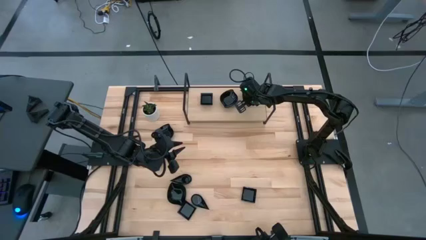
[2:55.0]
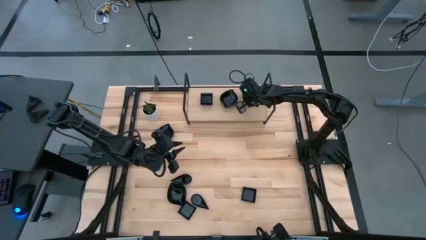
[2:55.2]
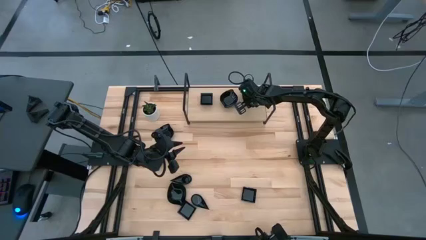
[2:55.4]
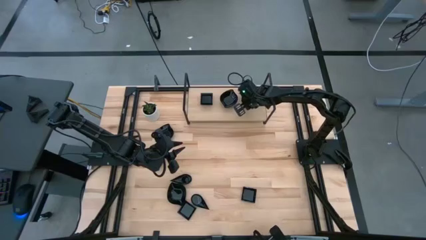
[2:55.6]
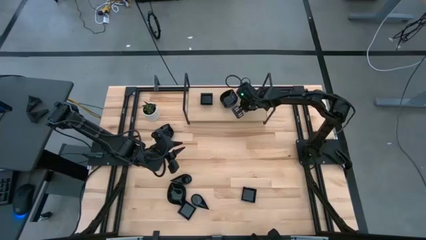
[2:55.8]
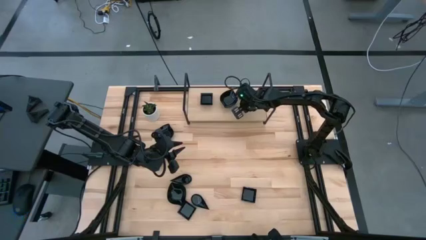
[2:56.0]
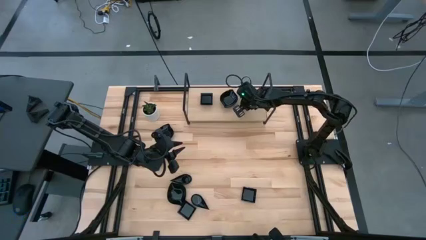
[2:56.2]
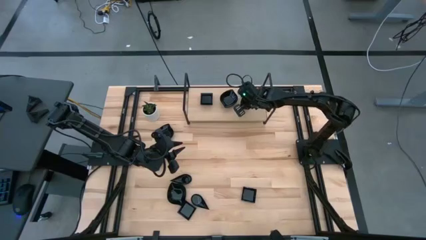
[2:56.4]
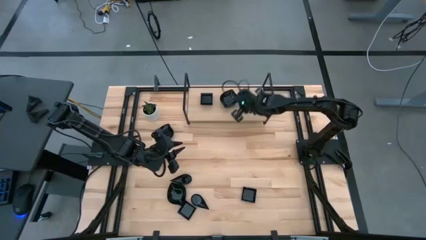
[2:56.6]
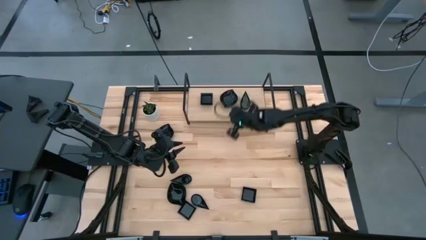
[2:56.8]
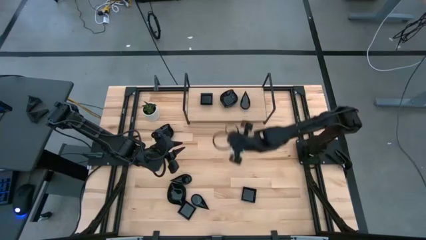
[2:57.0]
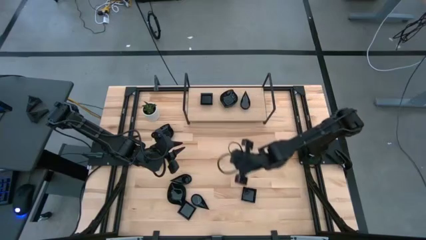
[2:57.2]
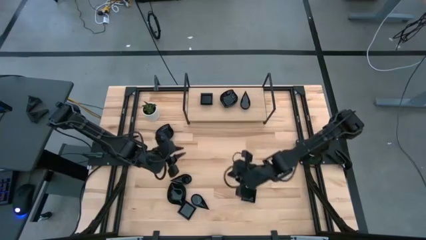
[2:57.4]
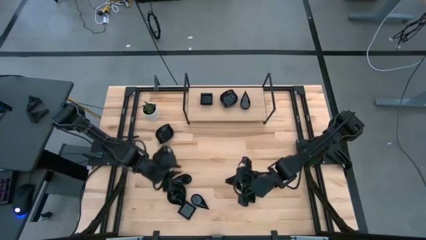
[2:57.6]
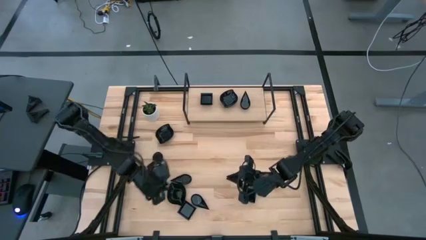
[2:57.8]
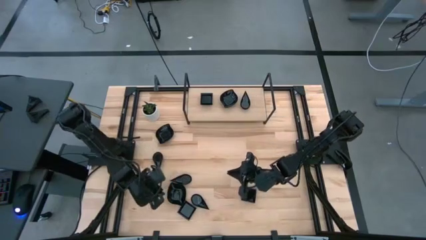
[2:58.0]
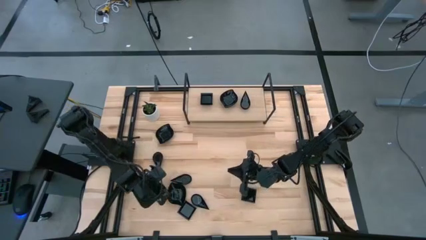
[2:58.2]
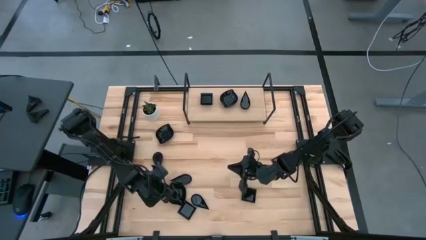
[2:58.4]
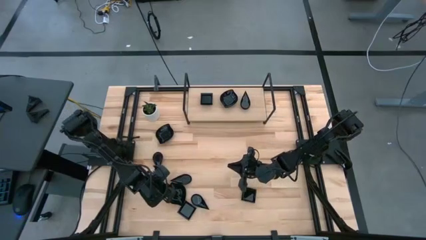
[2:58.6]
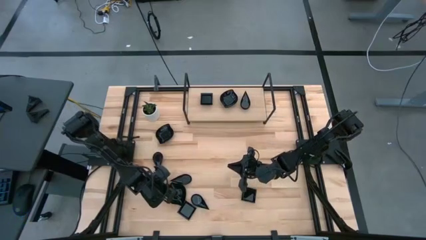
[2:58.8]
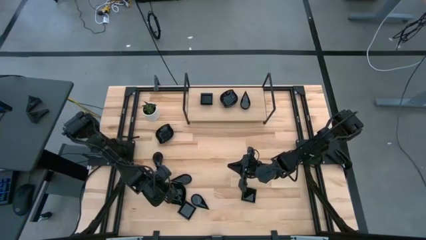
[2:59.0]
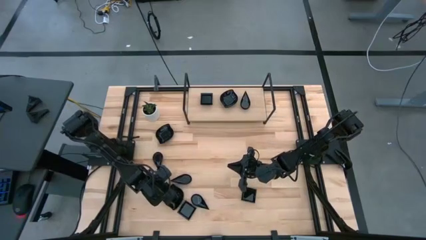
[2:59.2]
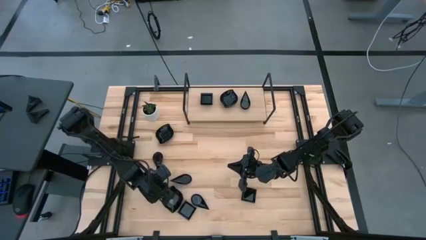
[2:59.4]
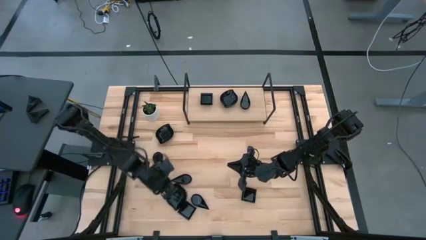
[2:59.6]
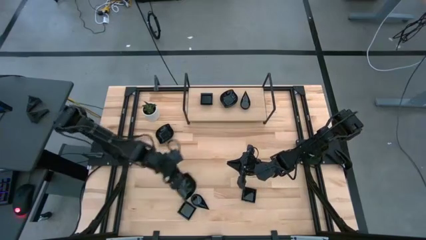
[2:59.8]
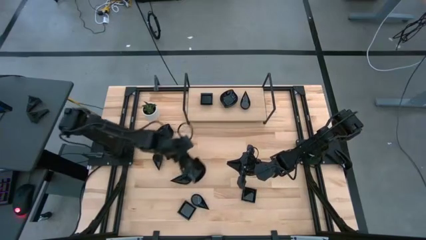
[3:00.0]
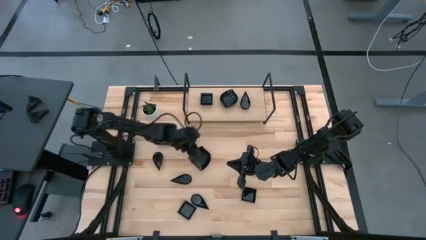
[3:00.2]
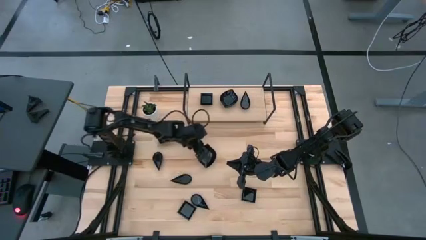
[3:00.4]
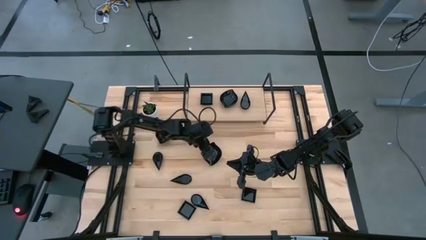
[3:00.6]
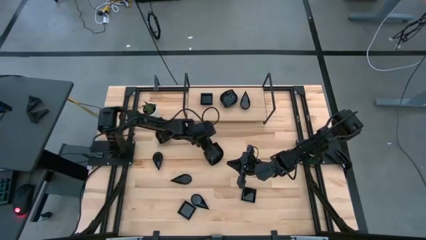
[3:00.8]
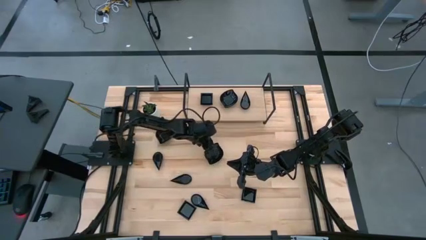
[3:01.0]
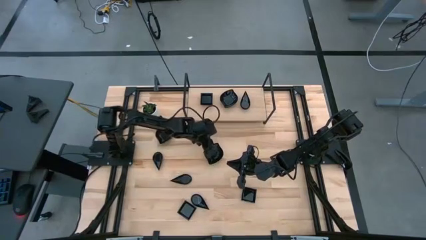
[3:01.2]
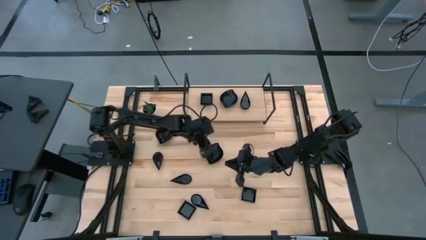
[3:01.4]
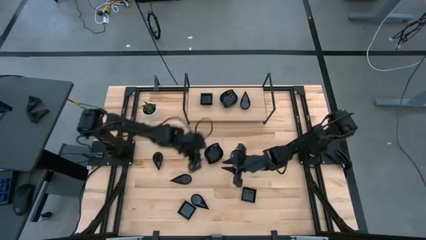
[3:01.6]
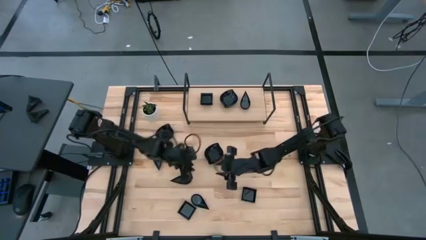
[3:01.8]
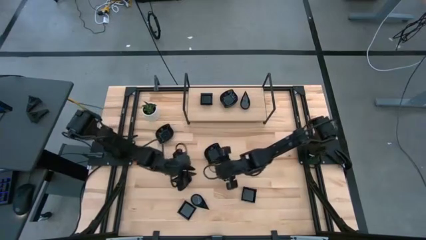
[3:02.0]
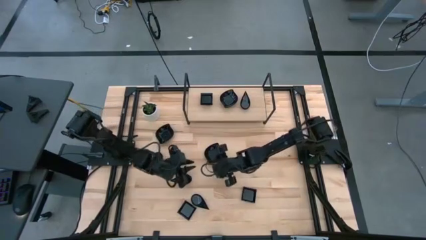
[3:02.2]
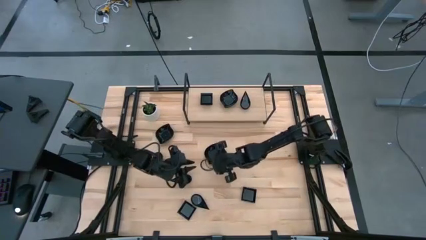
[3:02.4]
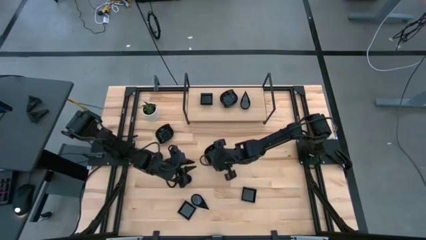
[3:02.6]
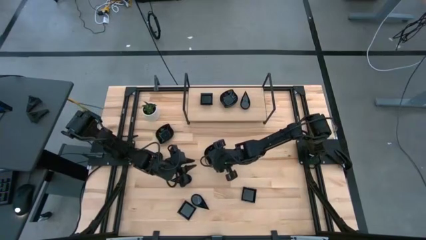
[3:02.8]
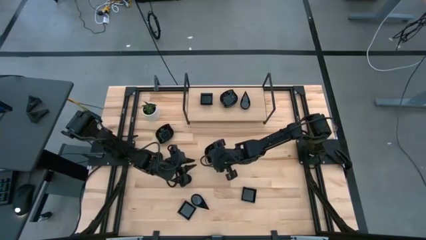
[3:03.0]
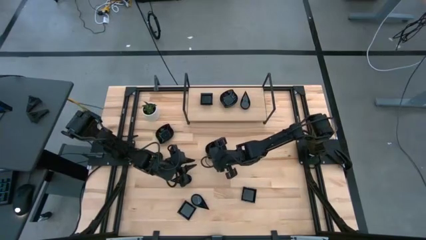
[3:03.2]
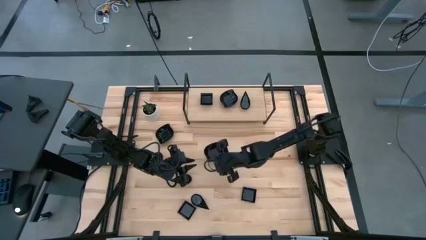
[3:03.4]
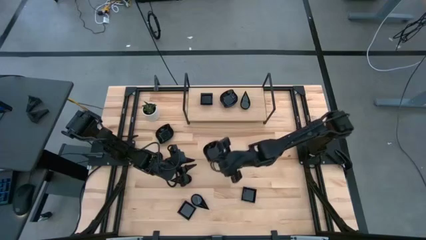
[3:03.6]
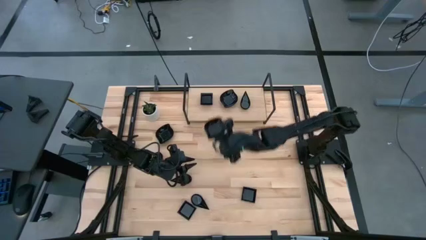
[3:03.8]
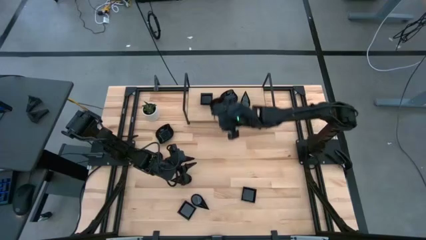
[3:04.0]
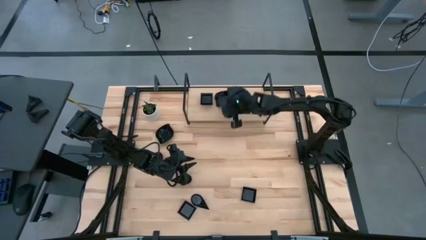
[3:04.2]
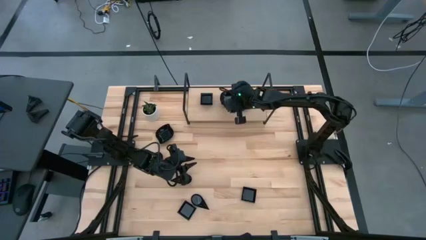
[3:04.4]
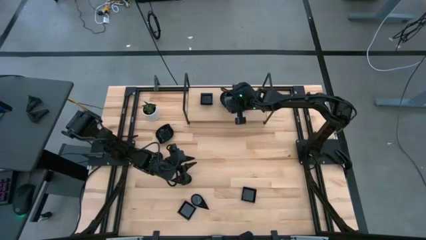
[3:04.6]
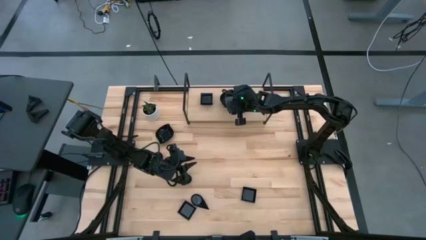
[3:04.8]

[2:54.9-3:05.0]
Task: Pick & Place Mini shaped plates
Stack the black leaf shaped bowl on top of the other black leaf shaped bowl on the shelf

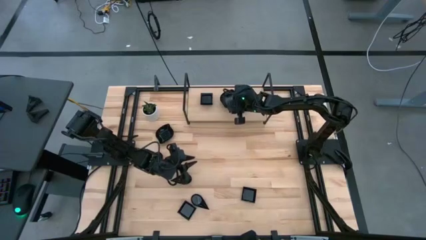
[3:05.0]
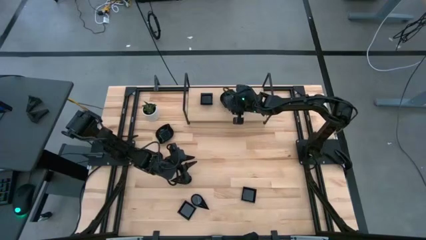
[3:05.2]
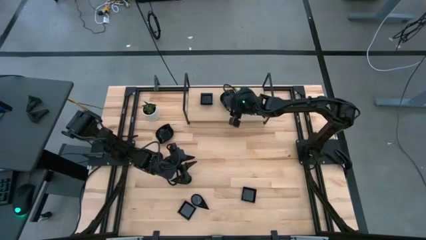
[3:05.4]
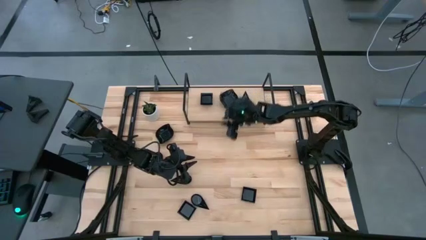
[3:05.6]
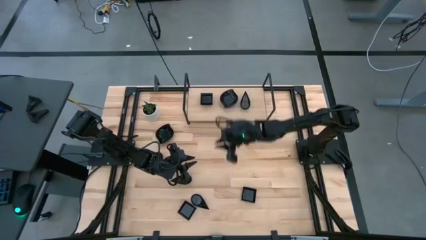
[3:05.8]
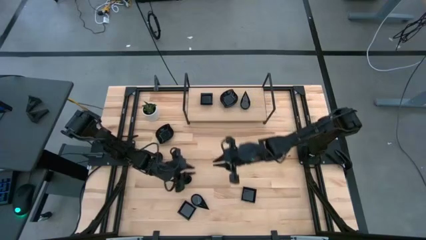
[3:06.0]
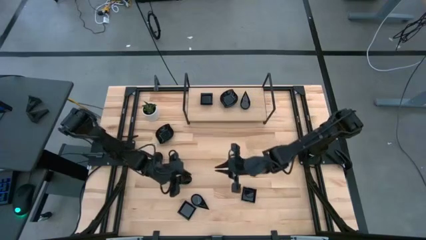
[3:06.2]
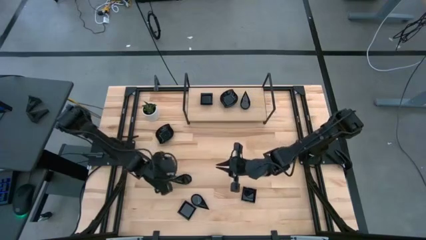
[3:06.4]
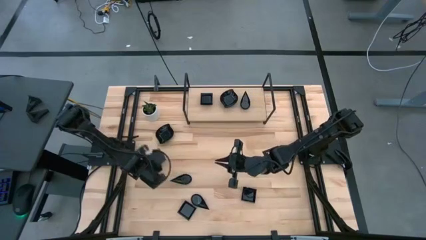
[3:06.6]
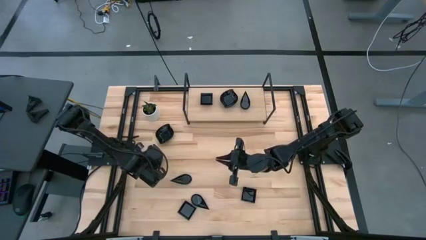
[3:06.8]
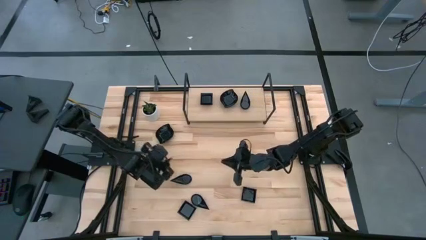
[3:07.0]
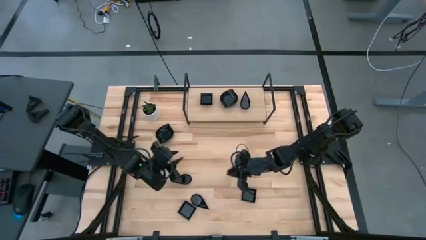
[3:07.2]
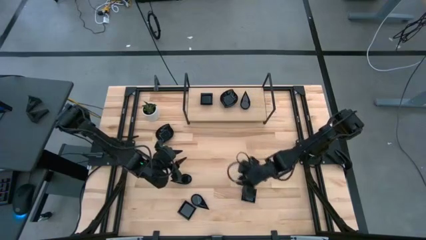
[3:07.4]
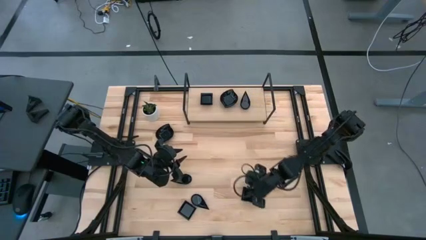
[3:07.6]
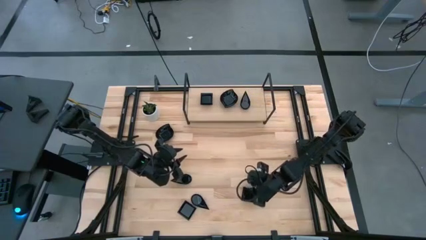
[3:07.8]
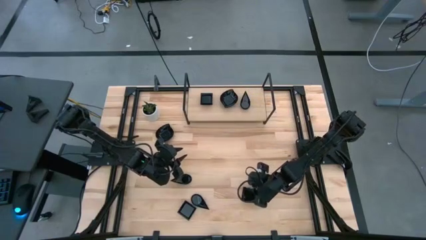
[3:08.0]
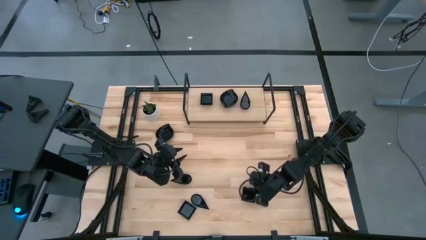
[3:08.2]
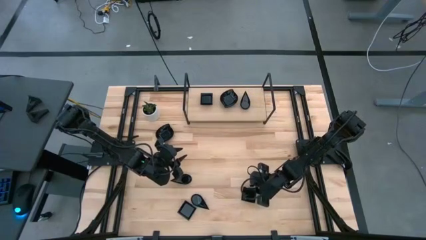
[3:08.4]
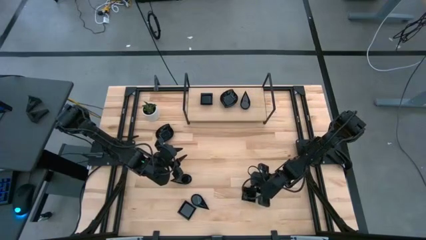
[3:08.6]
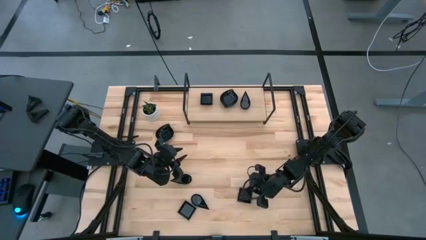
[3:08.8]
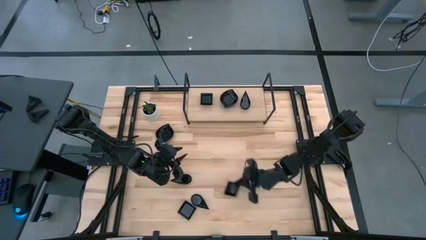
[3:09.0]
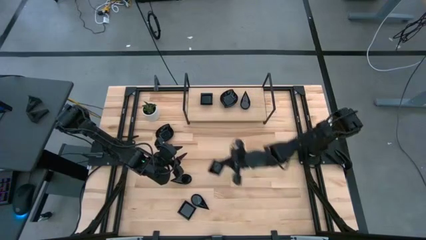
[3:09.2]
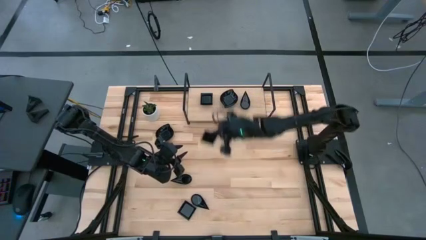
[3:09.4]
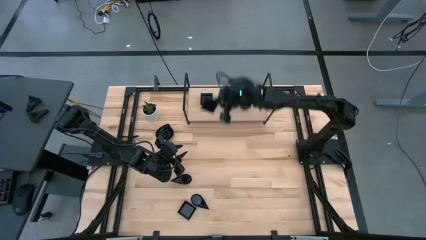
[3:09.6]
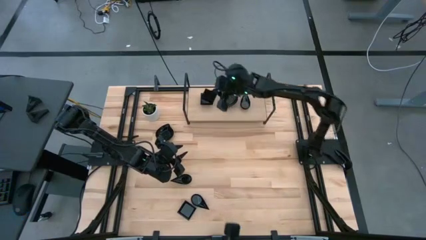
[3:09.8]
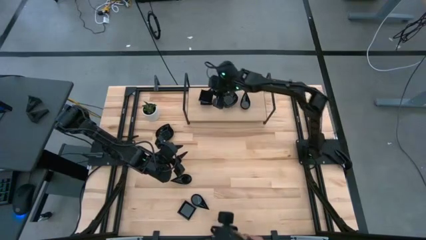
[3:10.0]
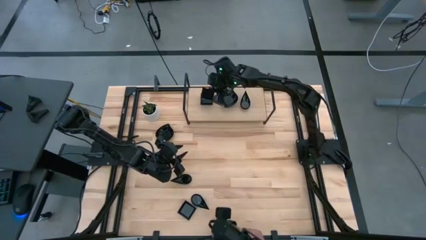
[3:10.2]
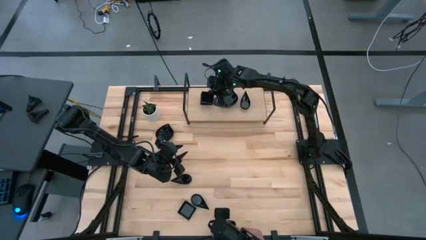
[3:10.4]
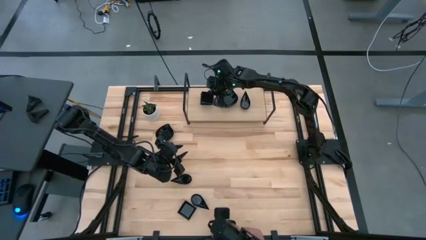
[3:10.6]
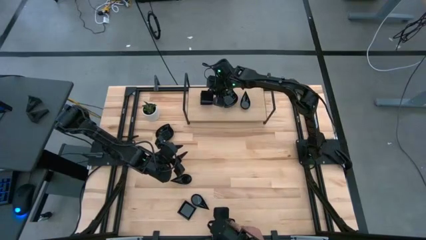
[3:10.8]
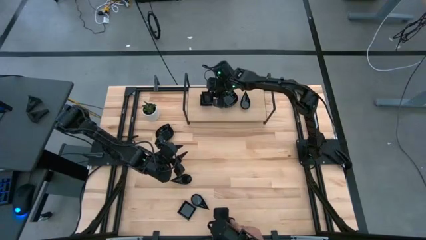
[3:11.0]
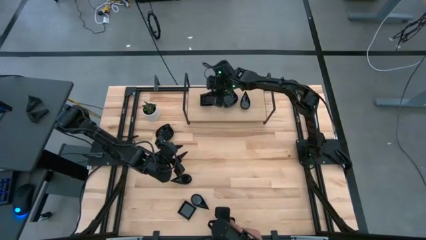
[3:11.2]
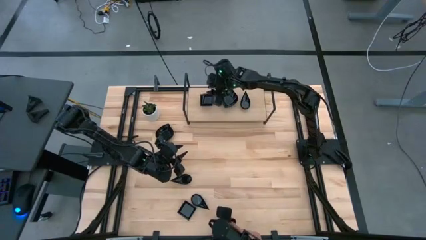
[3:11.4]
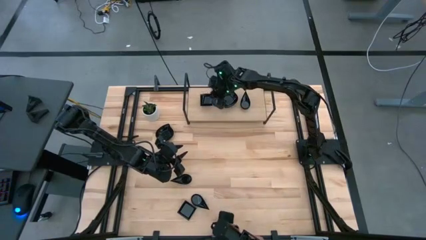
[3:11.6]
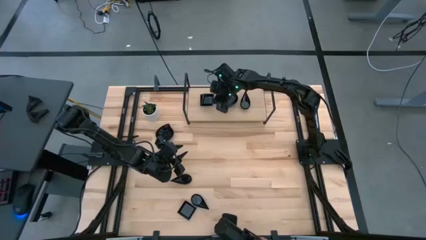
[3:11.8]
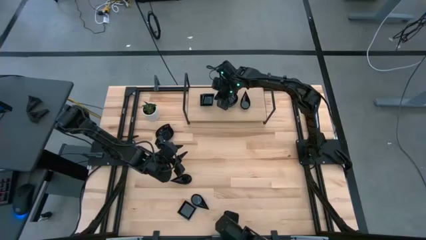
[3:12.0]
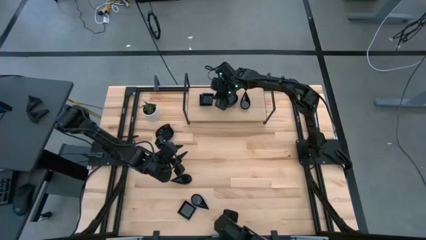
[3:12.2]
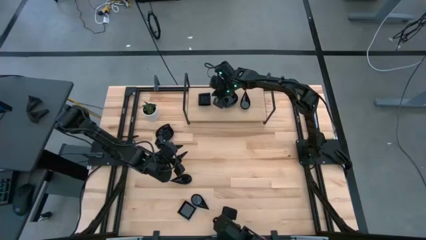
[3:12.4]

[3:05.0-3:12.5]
Stack the black square bowl on top of the other black square bowl on the shelf
